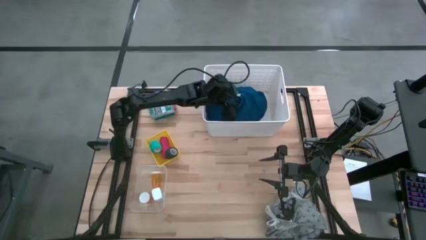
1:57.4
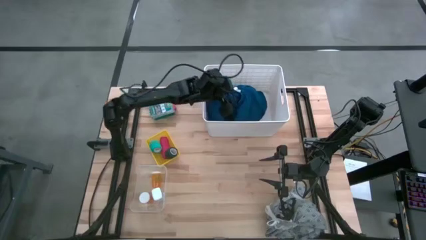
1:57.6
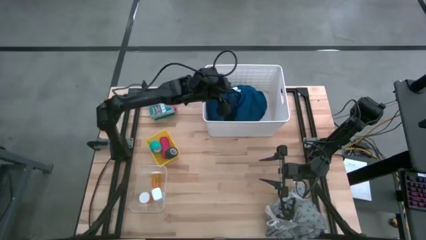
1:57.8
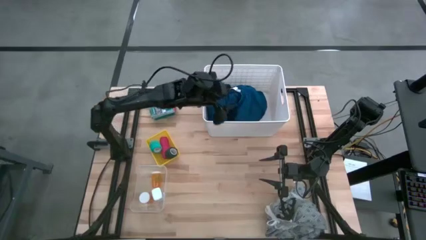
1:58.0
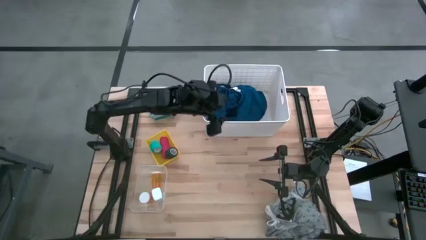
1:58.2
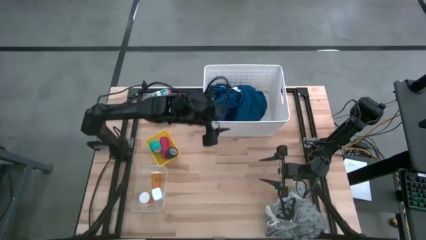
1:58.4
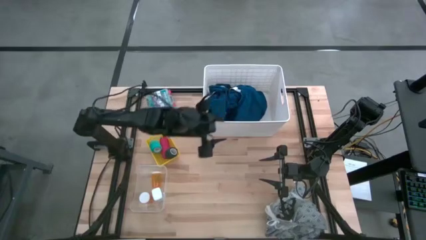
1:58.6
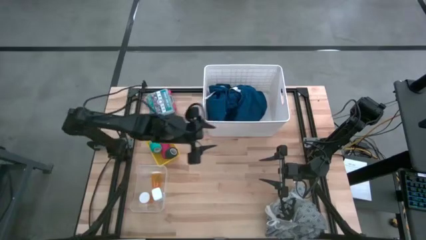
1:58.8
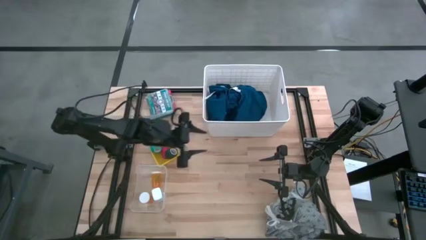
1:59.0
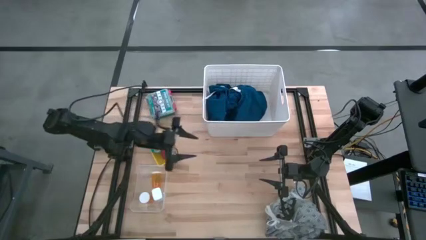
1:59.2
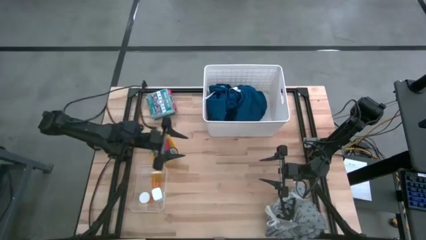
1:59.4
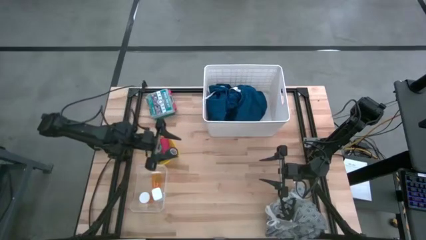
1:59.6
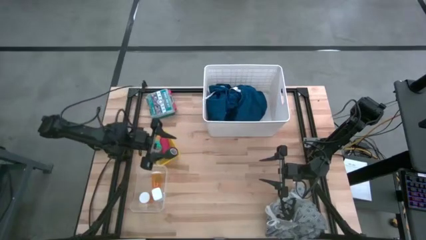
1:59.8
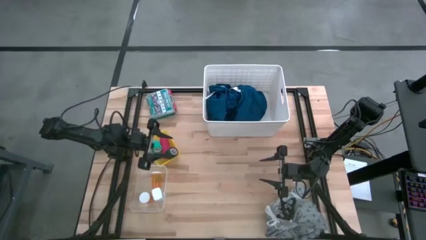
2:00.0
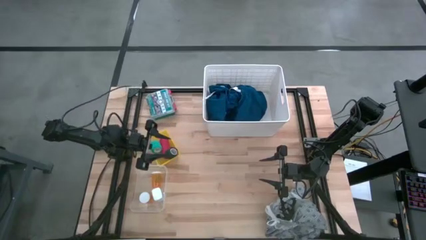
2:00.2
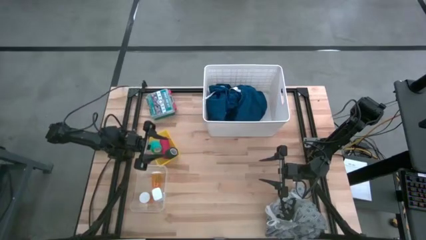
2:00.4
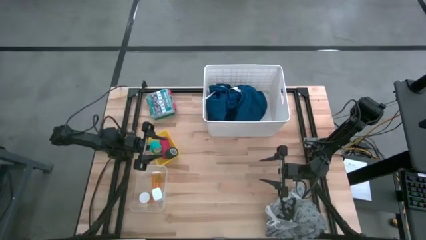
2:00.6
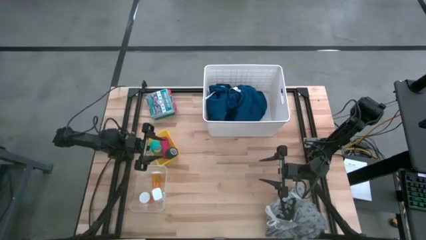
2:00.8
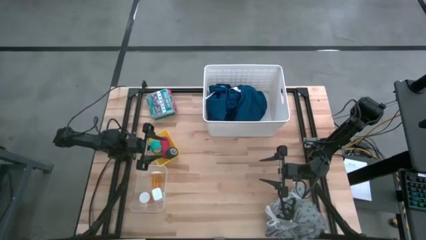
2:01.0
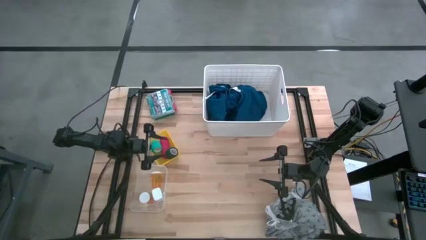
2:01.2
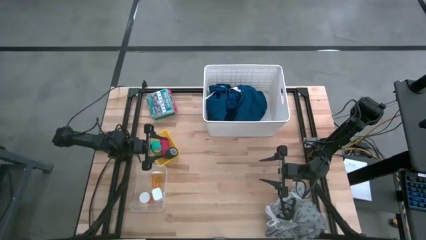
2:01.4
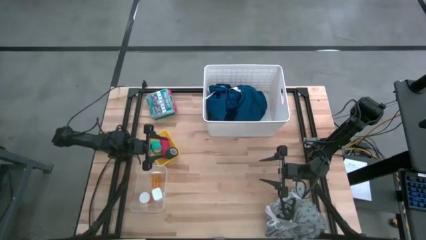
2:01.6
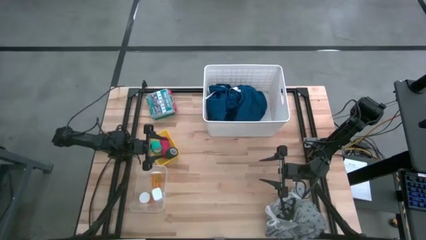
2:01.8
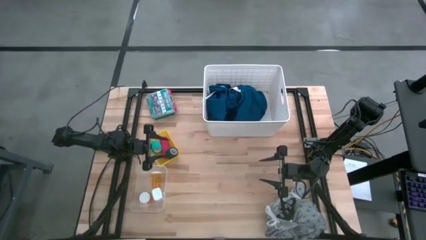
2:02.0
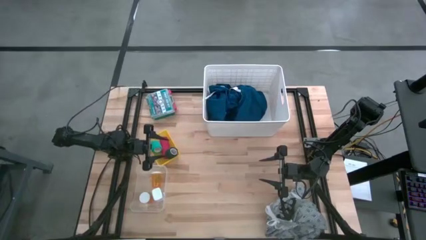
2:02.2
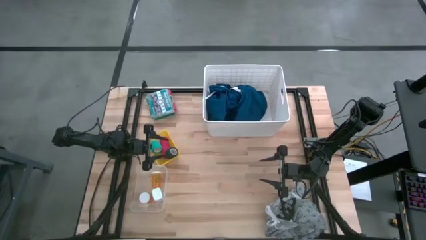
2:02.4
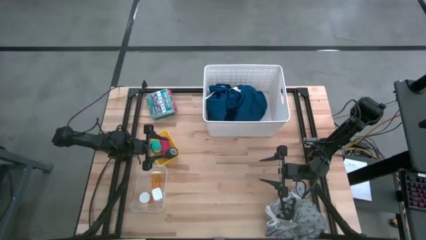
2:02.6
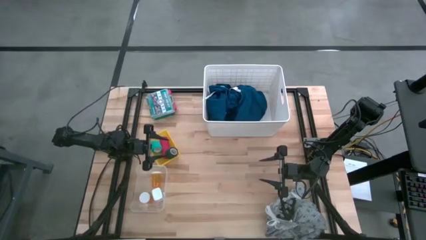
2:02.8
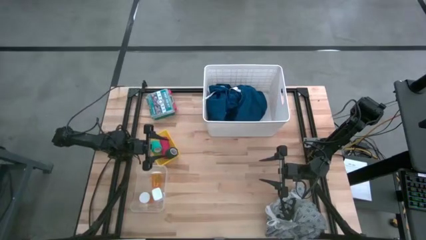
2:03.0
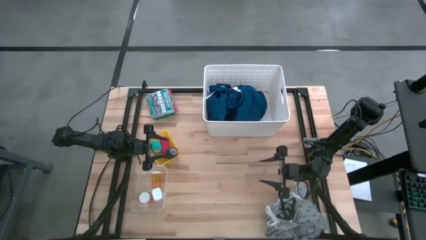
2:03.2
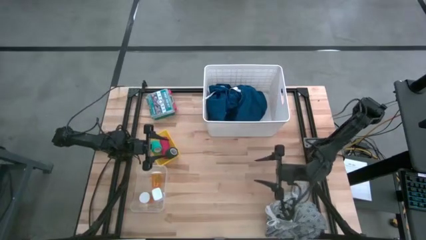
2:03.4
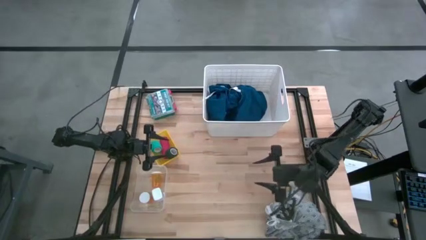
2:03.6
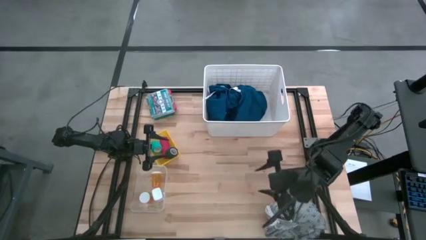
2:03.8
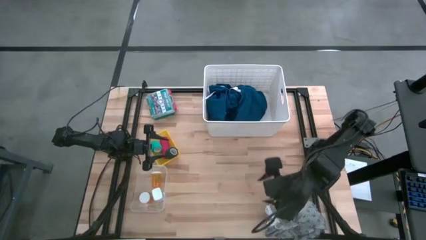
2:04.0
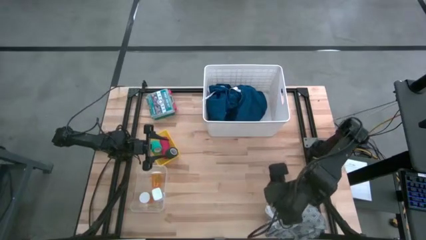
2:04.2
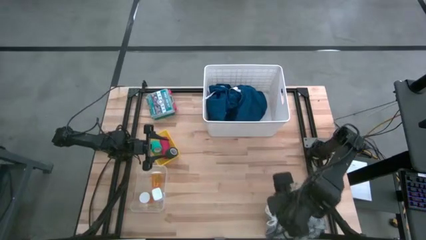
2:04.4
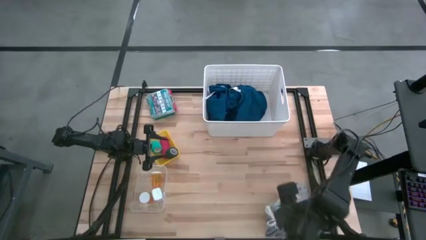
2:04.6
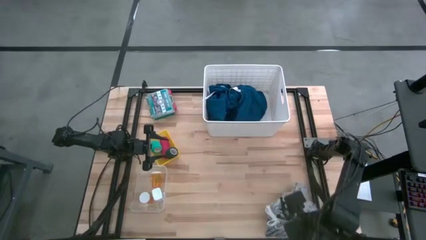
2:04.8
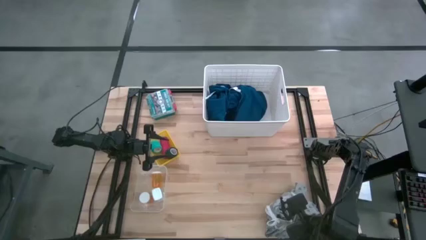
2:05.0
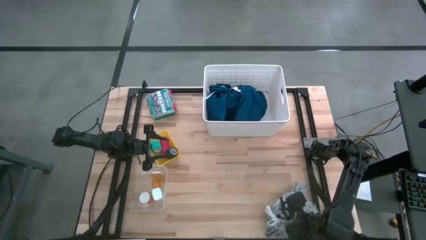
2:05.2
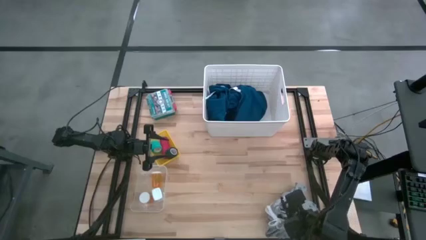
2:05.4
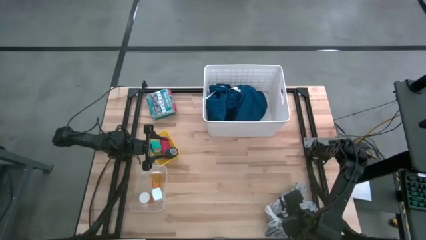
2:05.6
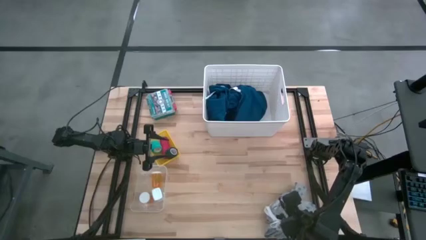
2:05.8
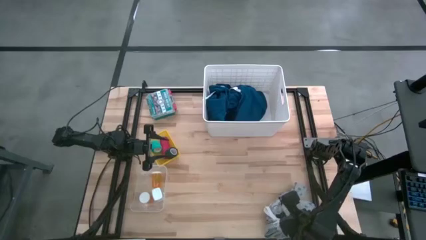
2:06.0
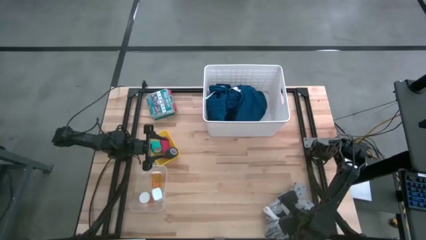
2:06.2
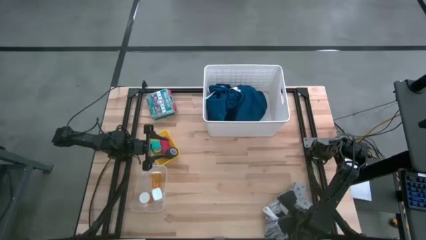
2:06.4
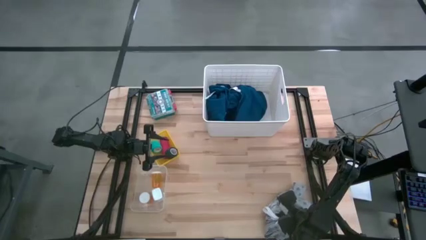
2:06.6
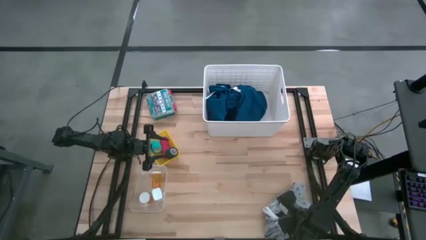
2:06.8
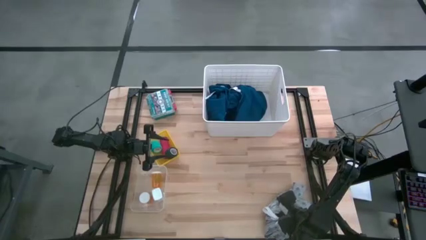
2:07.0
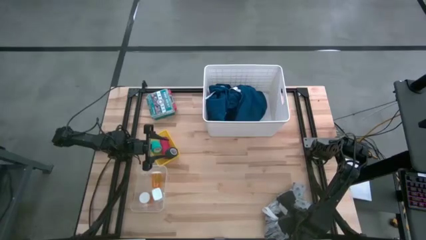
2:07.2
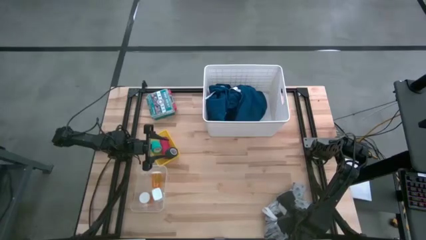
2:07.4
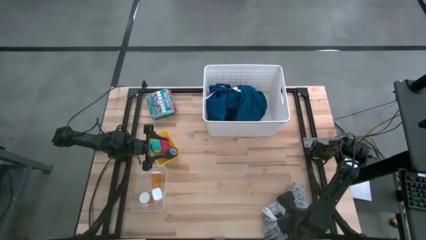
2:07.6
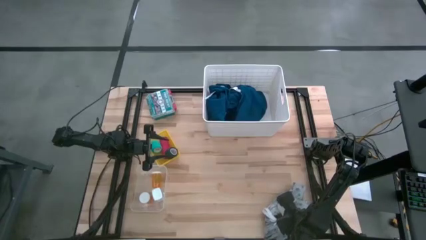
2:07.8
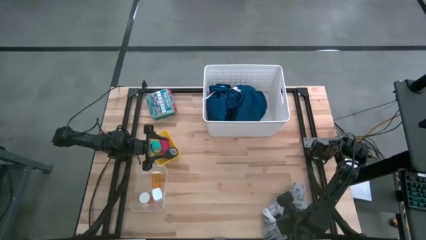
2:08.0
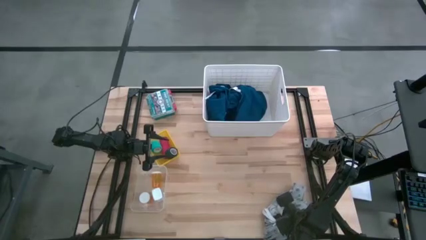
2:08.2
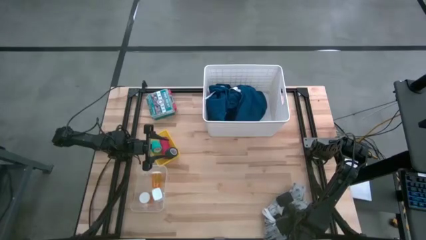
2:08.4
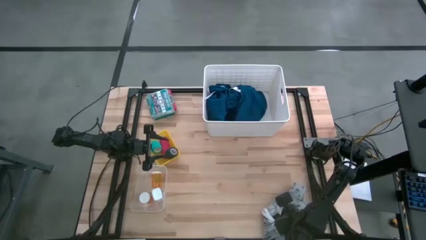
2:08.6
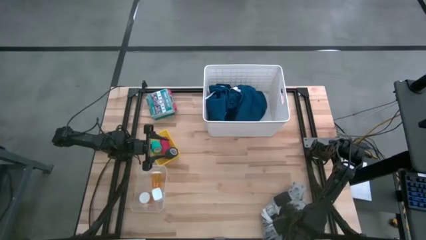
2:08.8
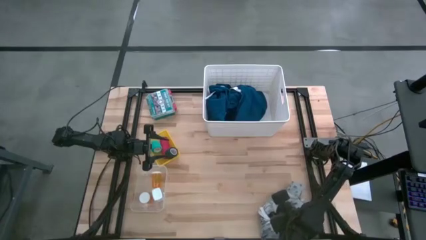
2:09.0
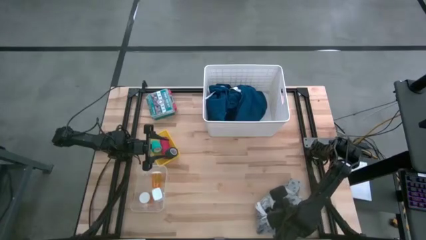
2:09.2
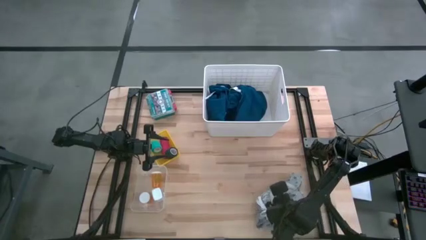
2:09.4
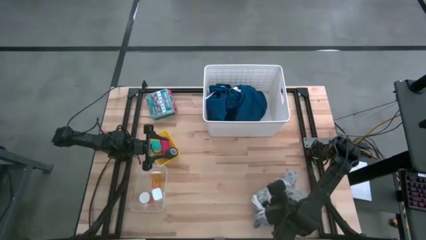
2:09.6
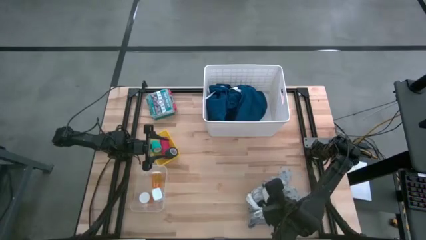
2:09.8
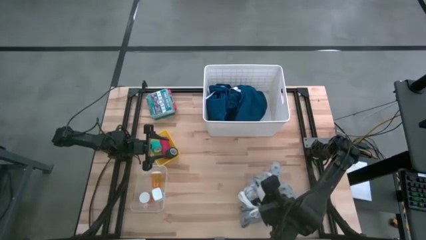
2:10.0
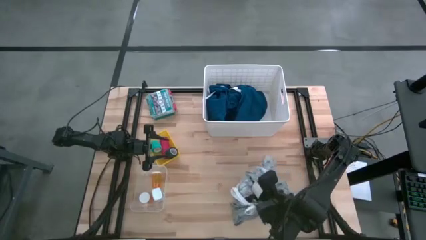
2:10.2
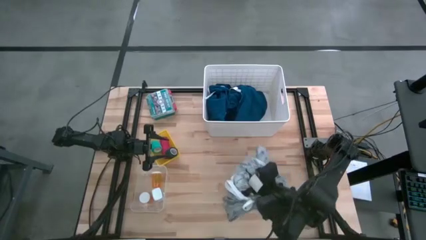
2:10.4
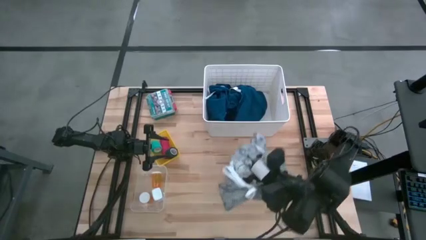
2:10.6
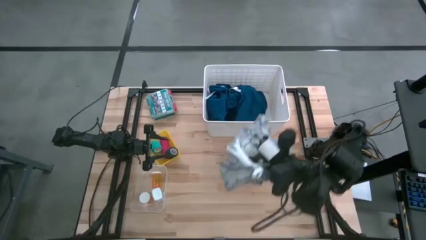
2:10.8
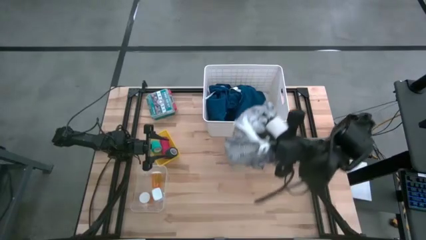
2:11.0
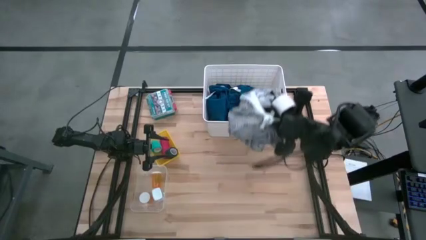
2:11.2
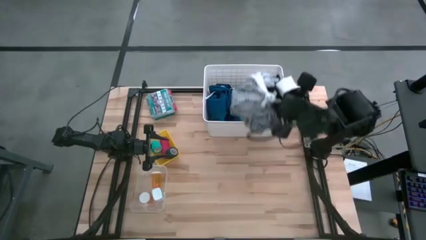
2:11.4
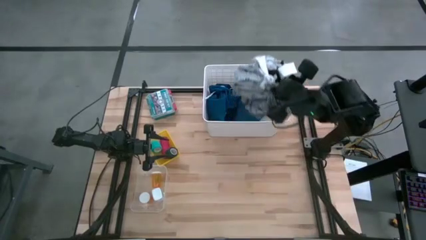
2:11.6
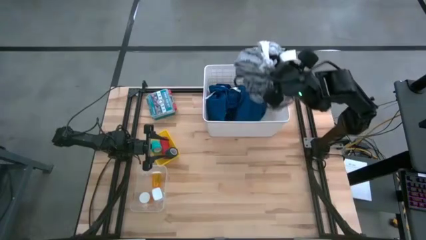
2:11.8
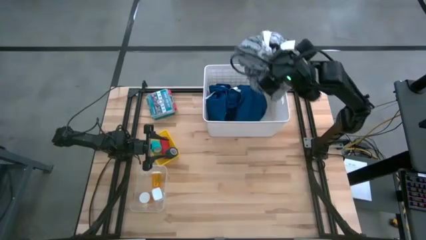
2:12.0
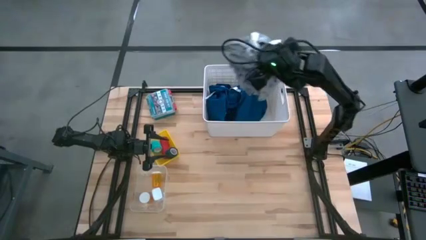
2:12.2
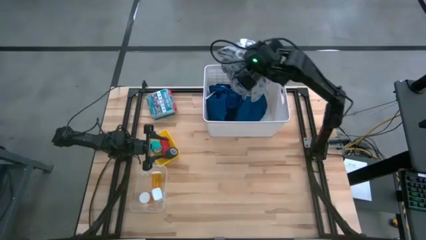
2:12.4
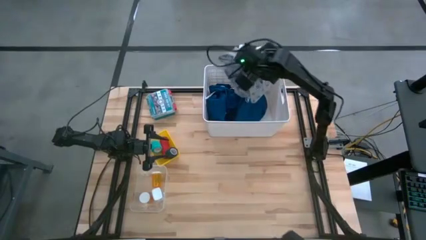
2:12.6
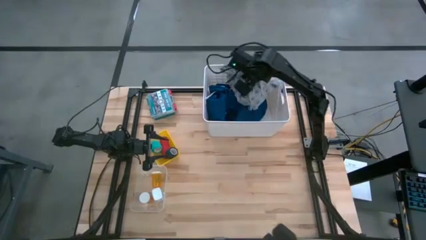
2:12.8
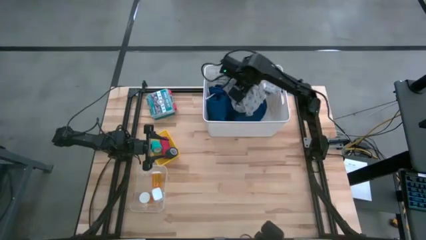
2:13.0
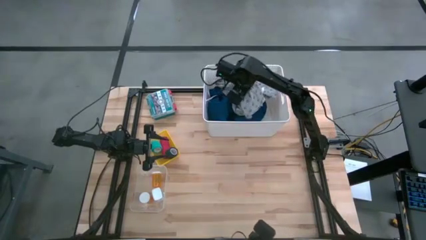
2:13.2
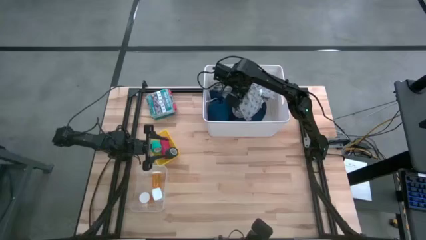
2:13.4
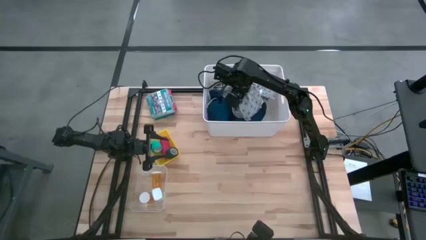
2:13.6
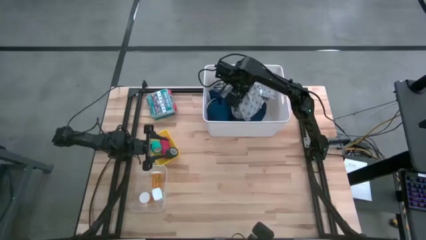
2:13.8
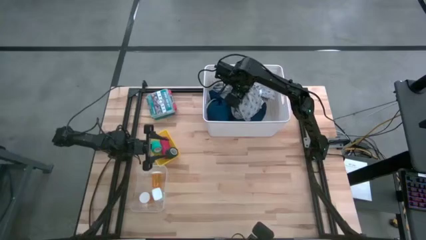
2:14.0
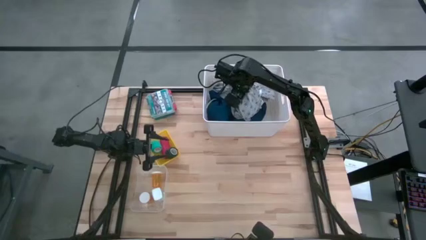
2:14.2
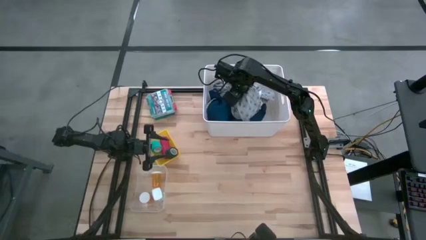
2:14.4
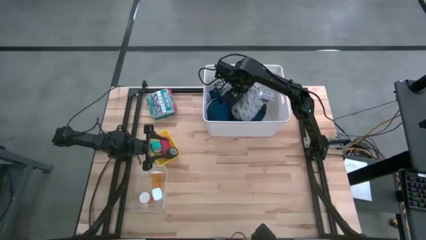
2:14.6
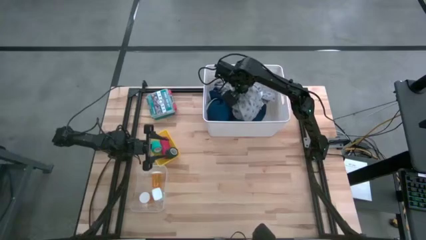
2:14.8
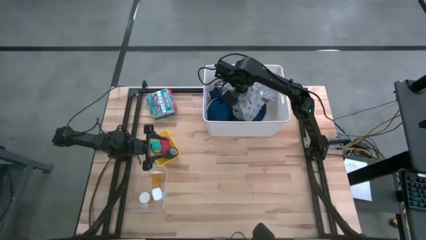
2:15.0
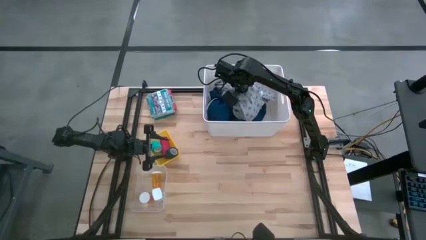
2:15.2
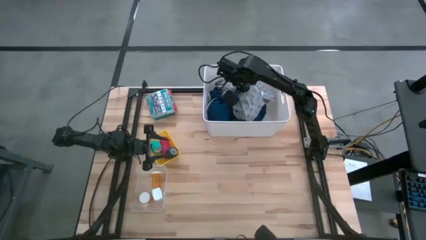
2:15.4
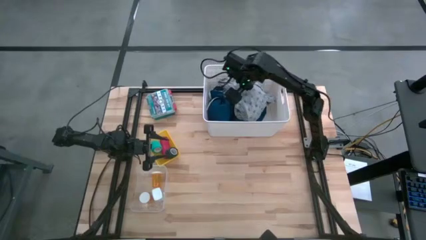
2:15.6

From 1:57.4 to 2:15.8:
Task: Pick & place medical supplies in basket/bin
Put the gray patterned patient gown into the white bin
